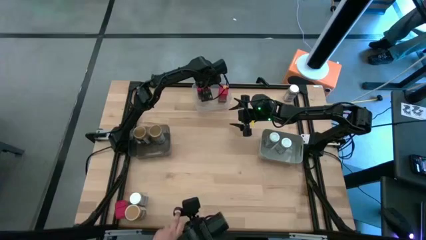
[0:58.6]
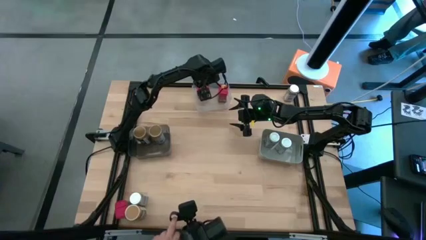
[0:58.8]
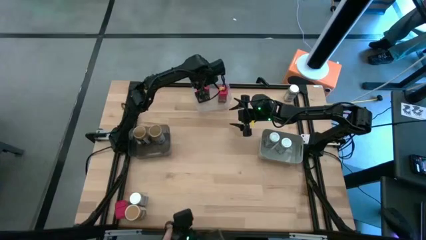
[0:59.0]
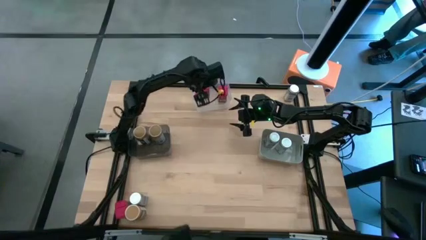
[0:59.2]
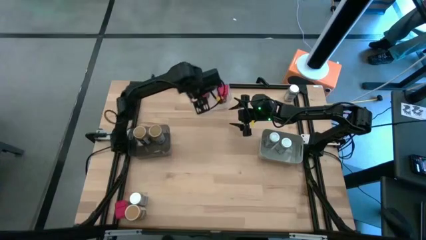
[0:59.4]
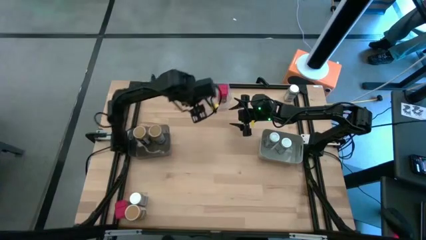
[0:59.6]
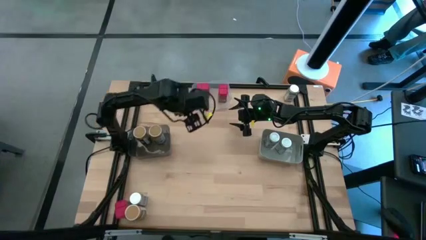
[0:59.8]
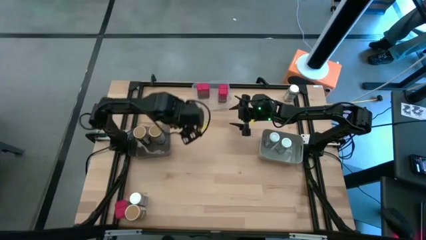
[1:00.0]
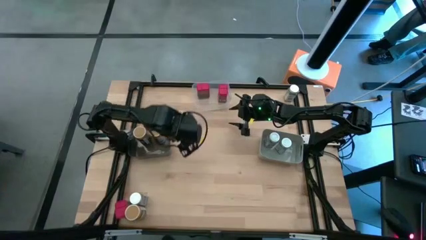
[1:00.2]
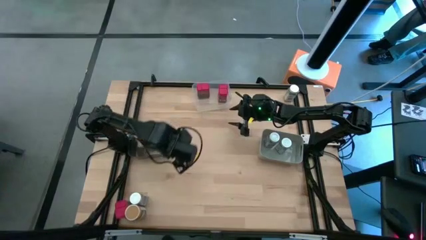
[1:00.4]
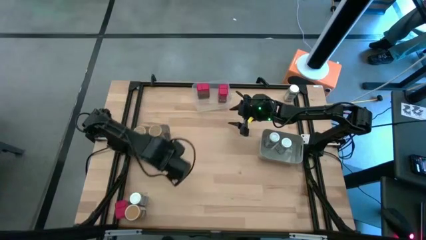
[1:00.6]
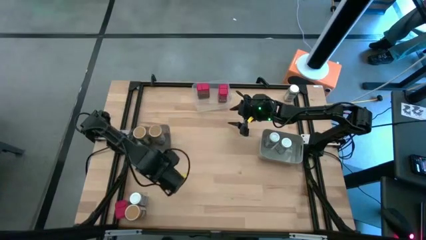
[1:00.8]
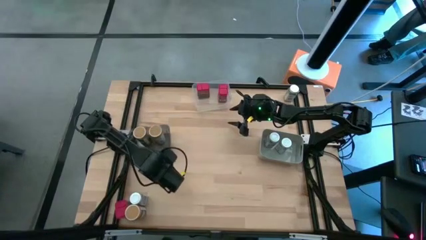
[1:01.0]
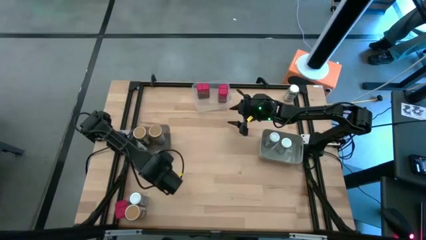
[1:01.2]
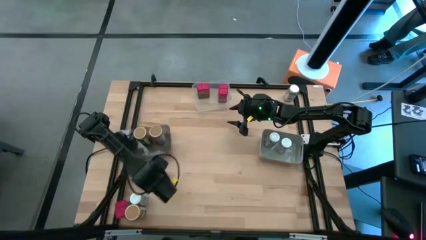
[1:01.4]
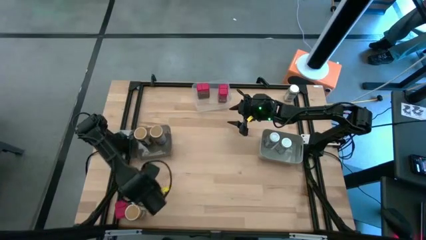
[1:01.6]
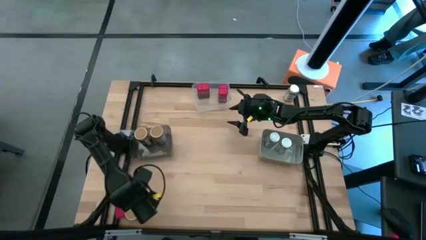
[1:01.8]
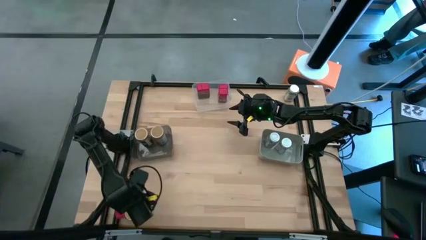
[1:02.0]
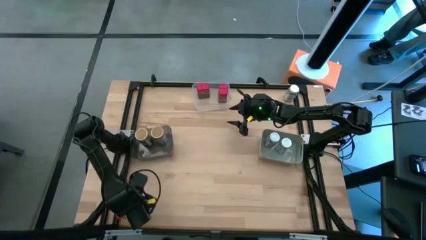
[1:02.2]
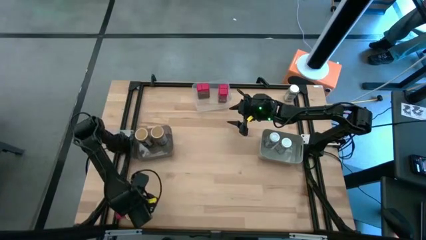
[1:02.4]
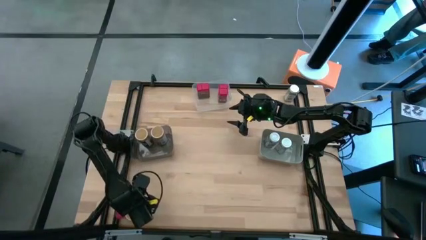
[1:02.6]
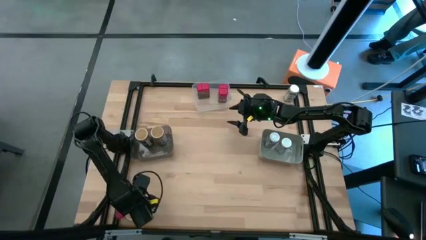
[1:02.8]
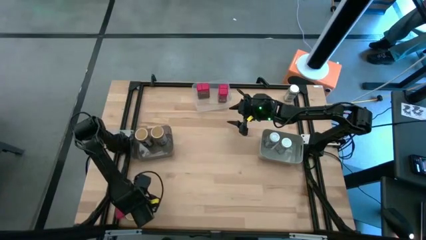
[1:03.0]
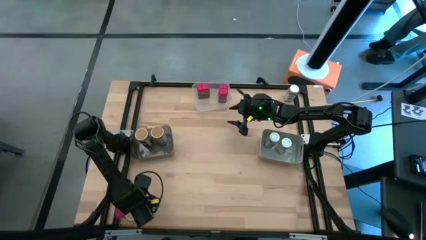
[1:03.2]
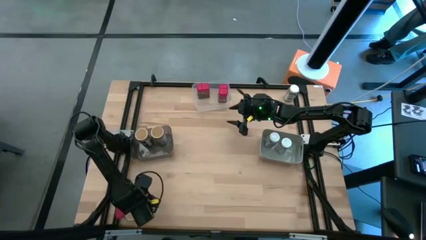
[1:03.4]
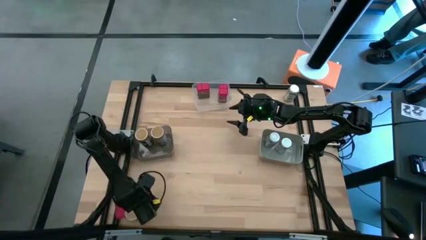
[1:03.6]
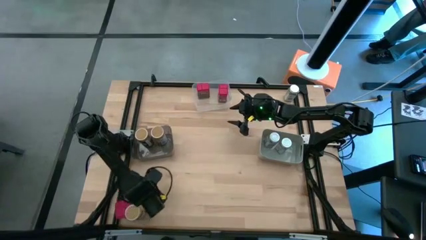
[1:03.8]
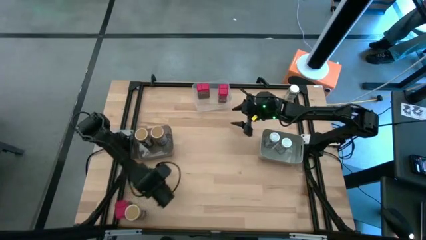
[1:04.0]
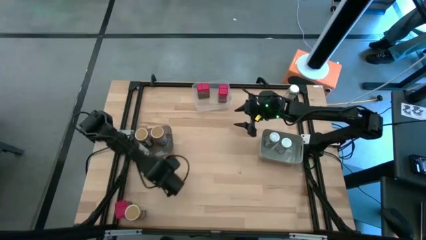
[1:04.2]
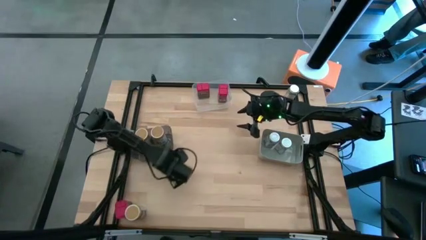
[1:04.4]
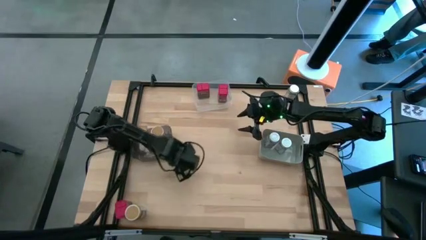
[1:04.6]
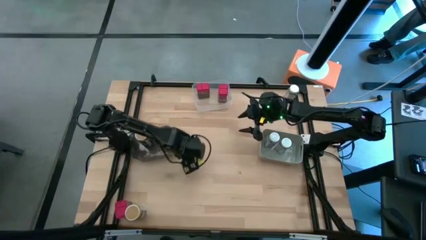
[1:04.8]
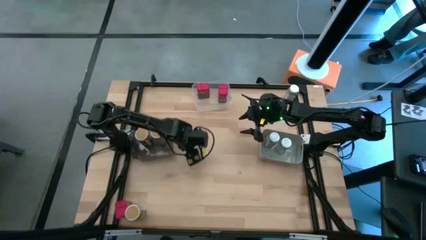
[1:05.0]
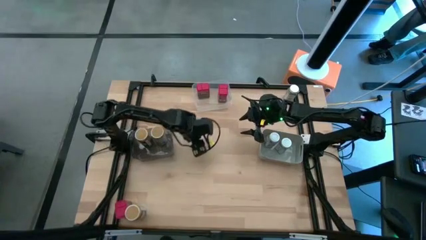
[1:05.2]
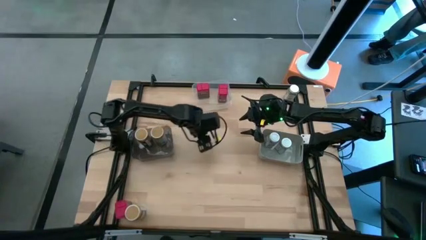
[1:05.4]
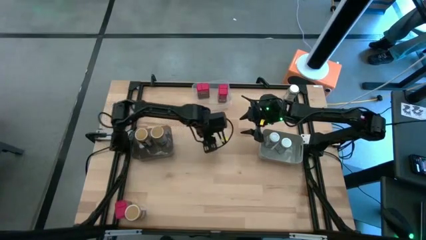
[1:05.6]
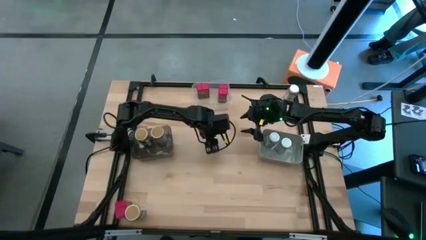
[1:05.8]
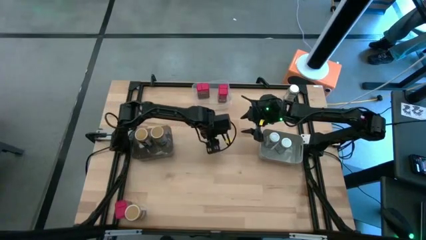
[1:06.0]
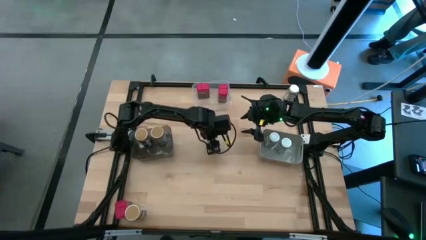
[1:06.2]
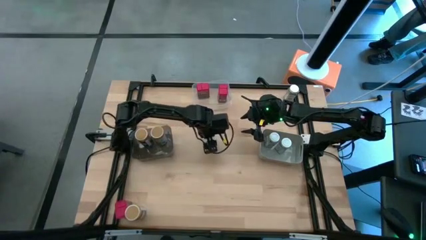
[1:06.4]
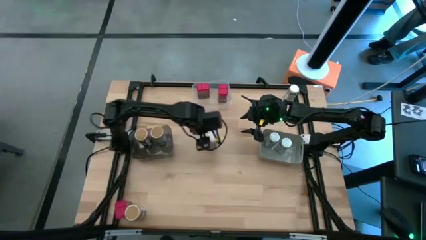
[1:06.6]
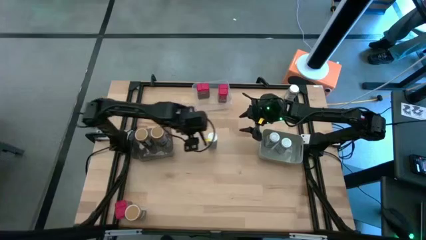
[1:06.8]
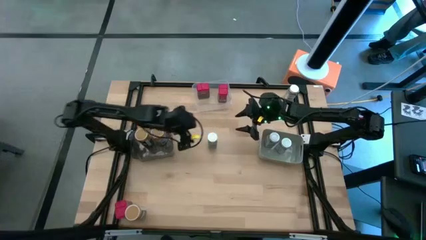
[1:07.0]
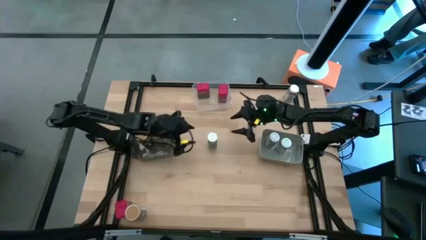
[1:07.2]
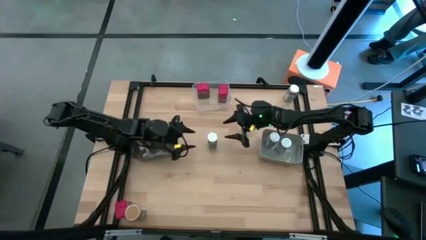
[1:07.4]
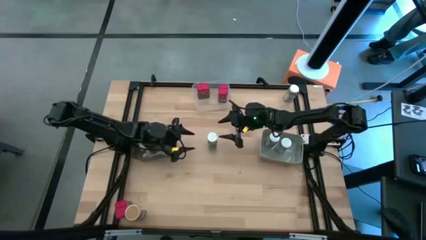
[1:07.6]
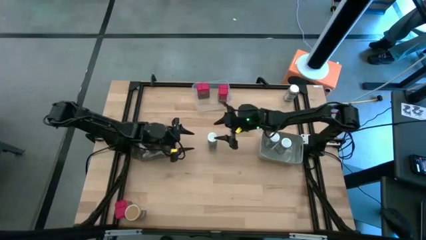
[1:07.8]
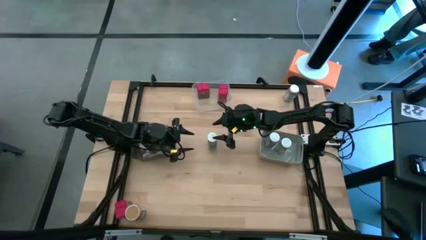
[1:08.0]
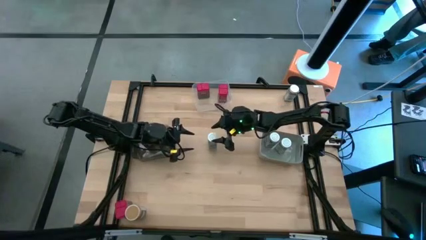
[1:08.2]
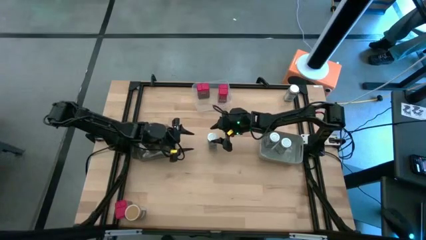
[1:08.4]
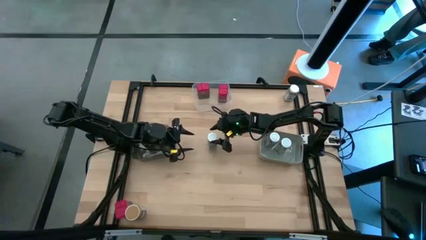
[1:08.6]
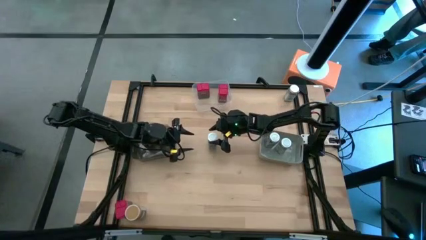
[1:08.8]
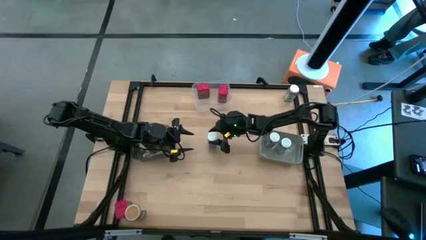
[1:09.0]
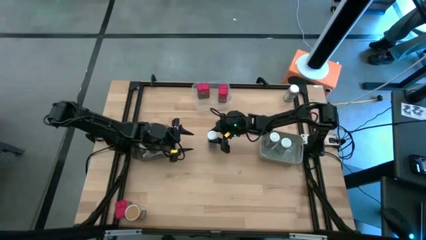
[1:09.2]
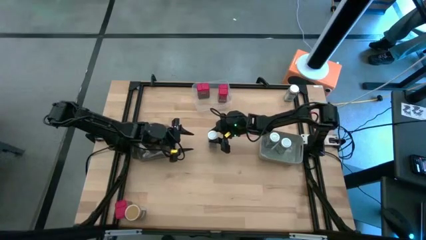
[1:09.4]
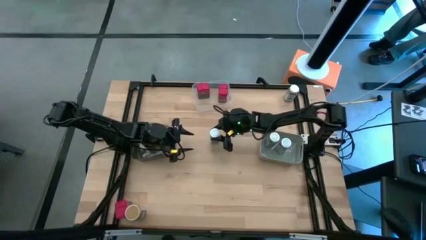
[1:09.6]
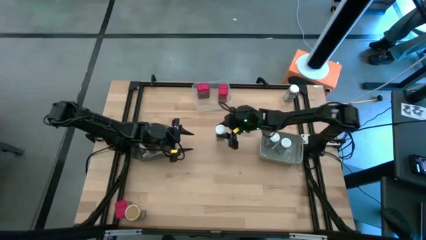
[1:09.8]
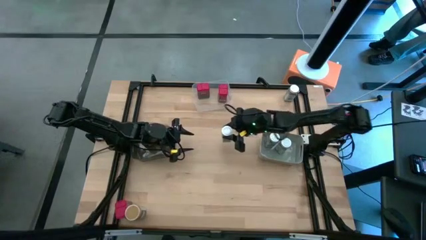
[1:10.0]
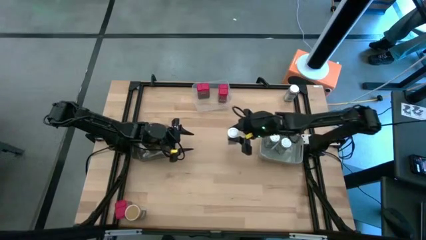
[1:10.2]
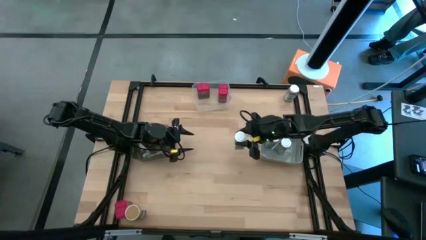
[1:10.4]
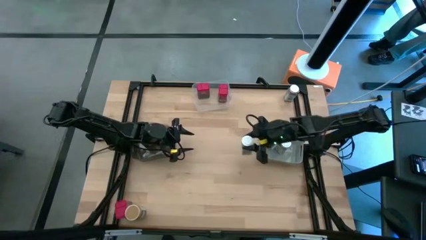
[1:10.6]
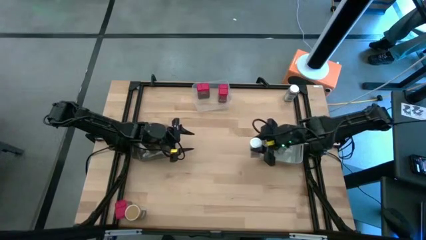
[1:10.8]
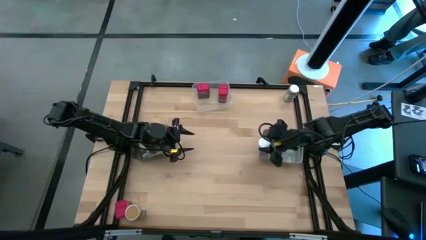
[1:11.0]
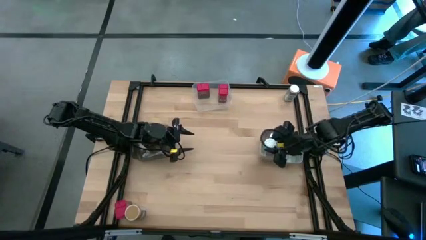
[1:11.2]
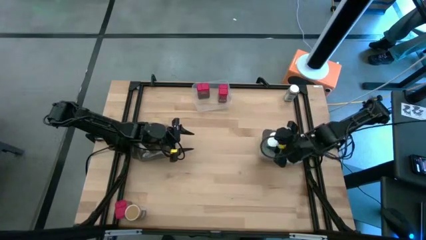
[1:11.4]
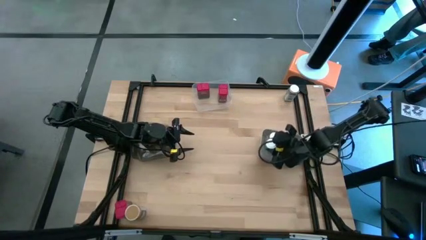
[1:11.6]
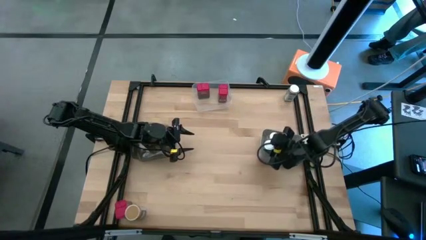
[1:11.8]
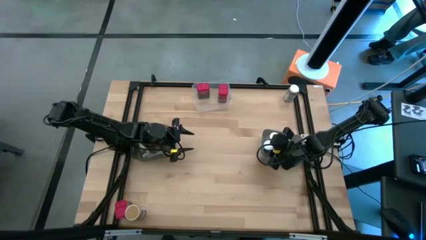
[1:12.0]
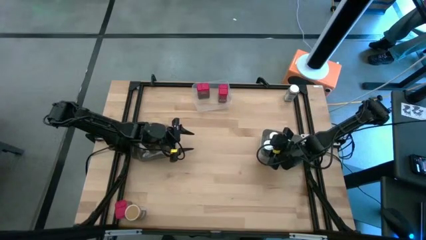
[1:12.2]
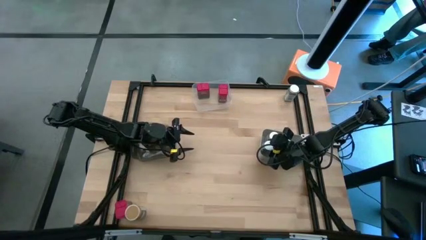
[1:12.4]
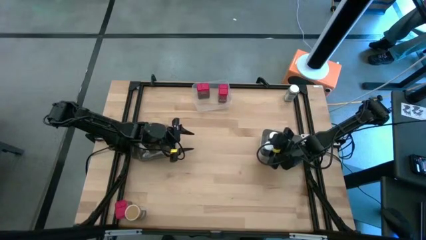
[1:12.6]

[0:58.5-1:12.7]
Task: Sort spices by type
Put the bottom white spice bottle into the gray bin

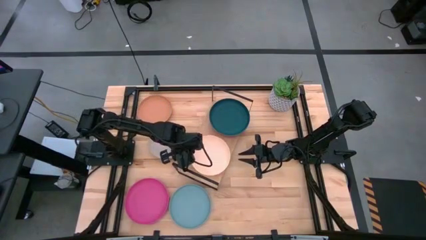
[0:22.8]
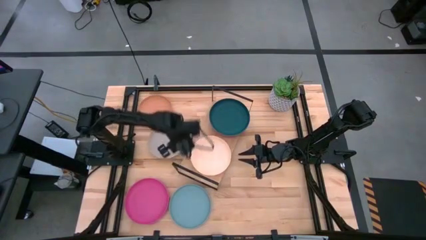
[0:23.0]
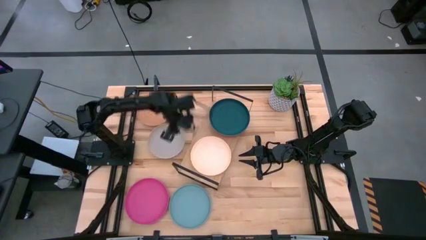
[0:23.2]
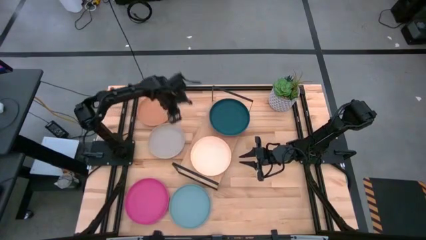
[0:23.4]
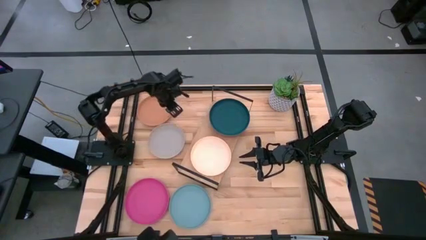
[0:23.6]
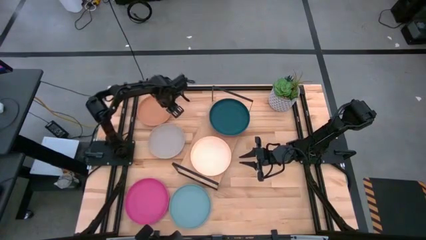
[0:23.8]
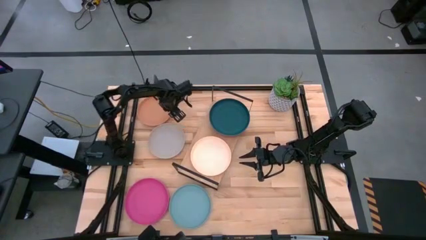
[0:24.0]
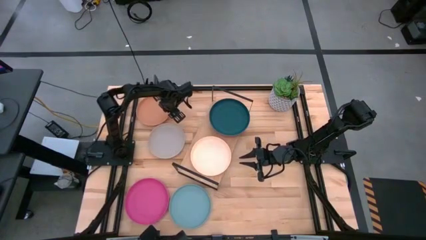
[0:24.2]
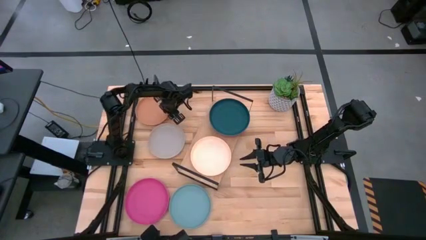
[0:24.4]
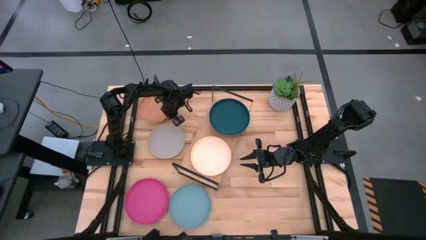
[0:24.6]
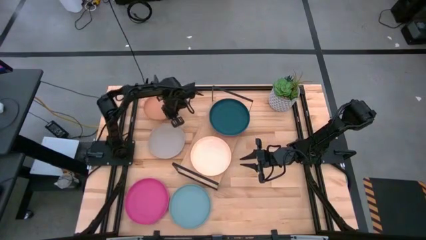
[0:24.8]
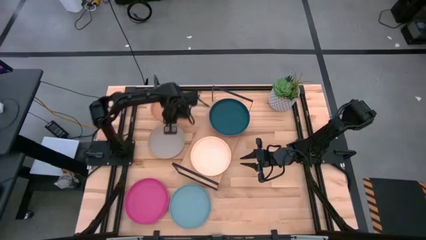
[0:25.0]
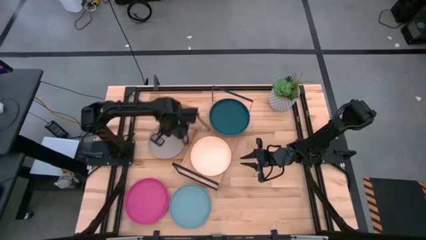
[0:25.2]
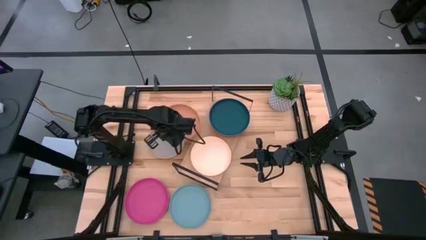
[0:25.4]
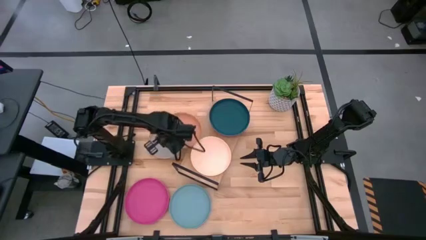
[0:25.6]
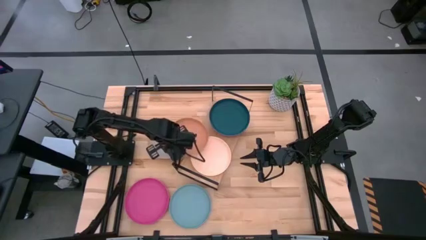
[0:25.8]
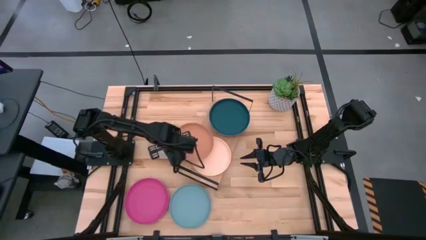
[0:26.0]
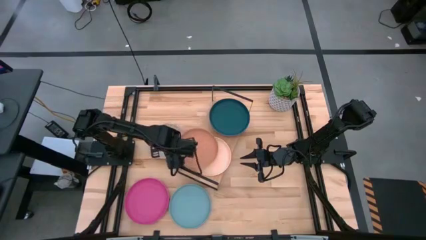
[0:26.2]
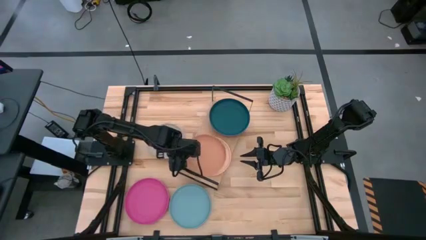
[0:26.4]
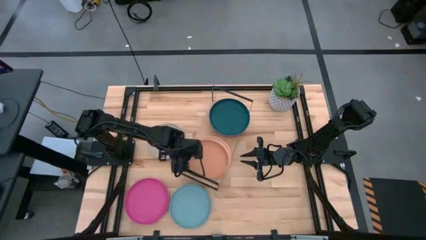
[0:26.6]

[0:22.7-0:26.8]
Task: Place and stack plates onto a shelf
Stack the brown plate on top of the white plate on the shelf
